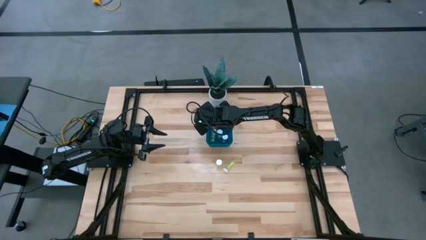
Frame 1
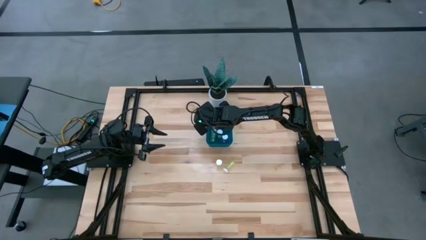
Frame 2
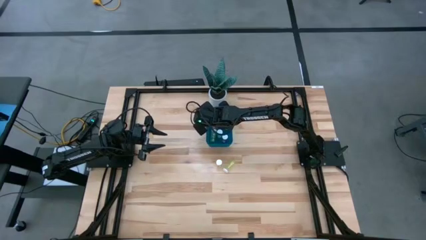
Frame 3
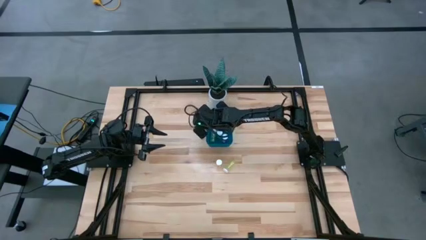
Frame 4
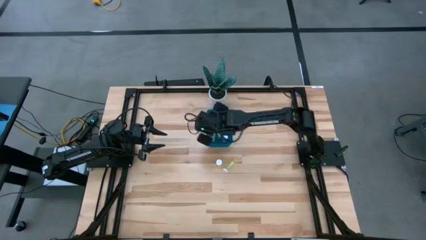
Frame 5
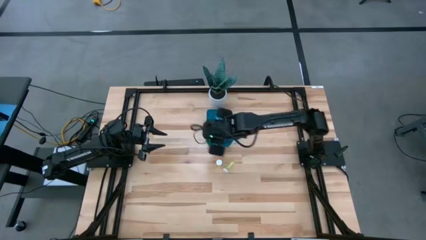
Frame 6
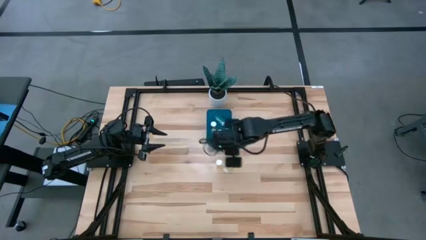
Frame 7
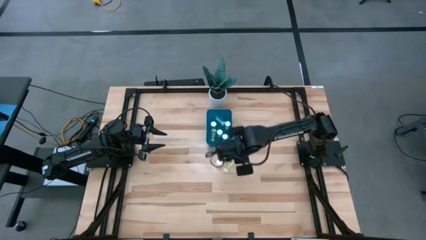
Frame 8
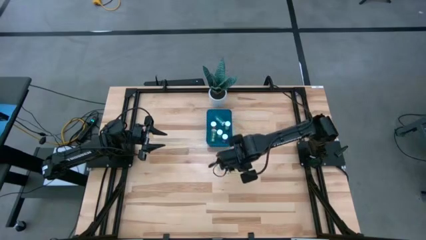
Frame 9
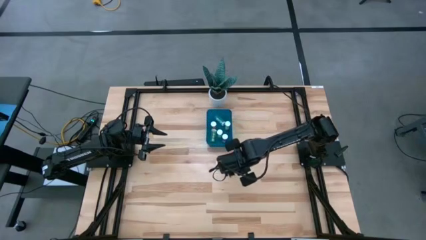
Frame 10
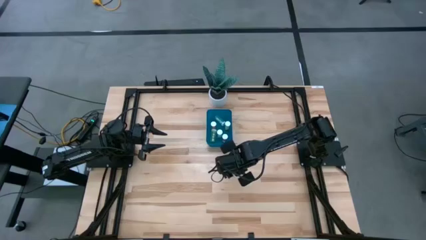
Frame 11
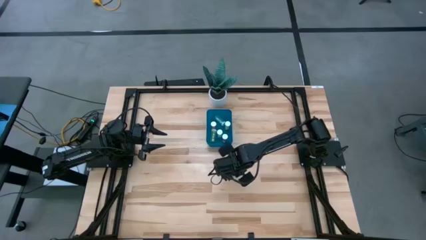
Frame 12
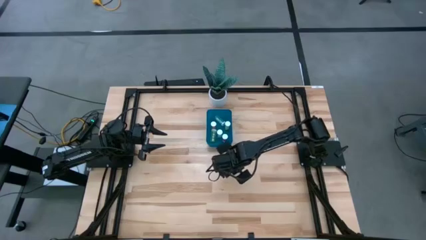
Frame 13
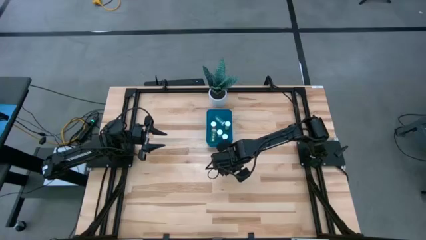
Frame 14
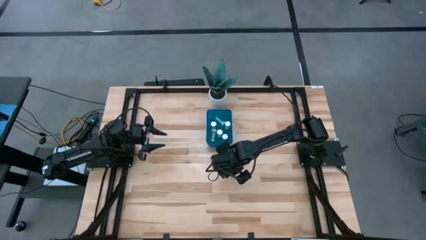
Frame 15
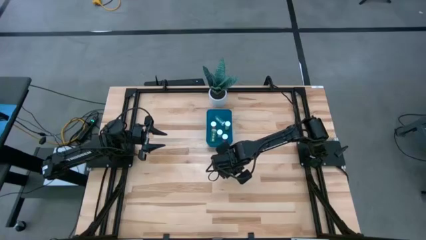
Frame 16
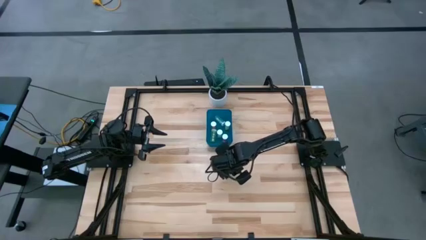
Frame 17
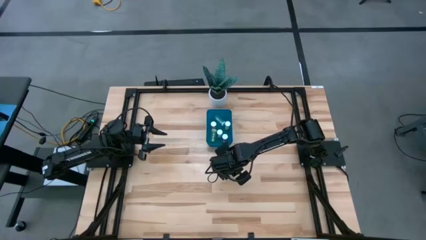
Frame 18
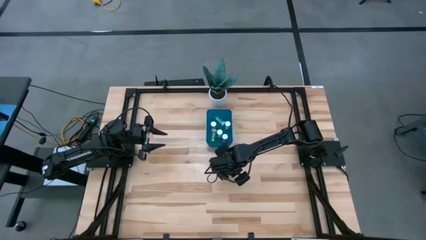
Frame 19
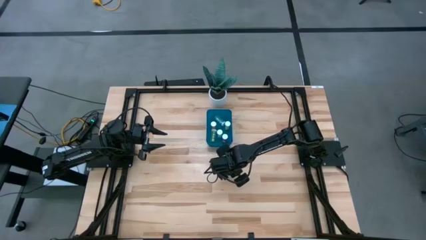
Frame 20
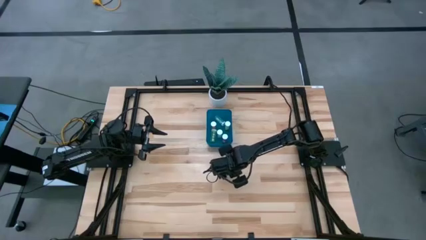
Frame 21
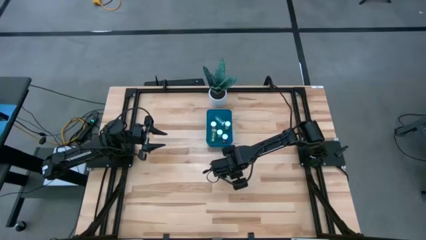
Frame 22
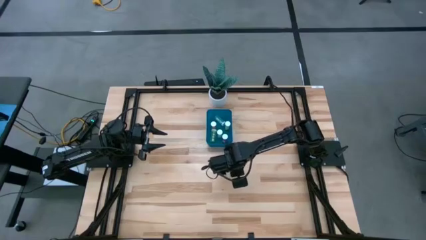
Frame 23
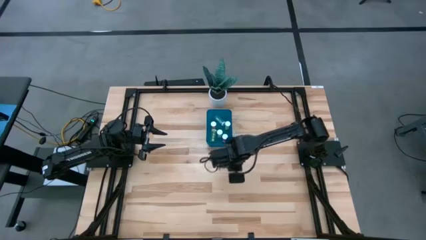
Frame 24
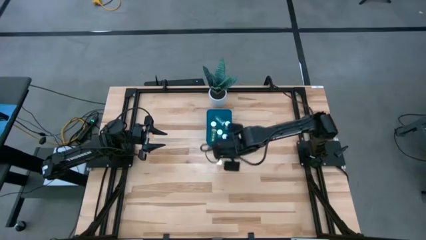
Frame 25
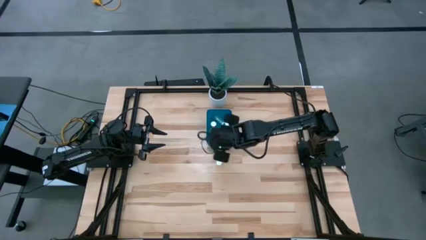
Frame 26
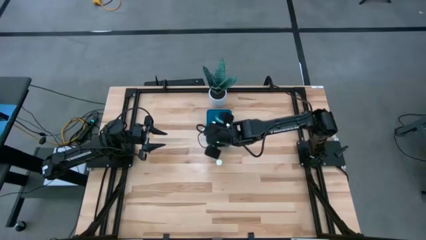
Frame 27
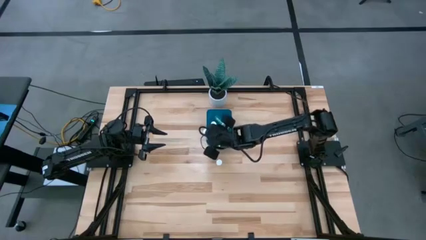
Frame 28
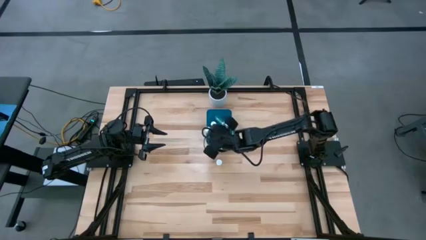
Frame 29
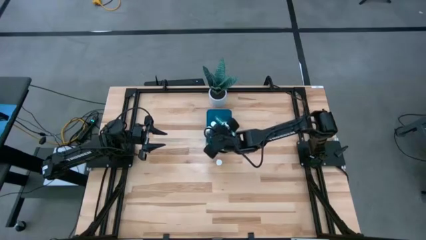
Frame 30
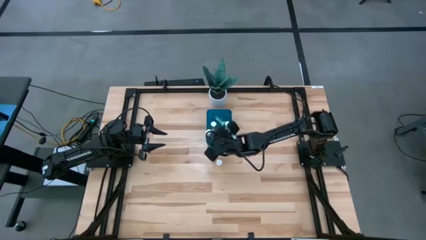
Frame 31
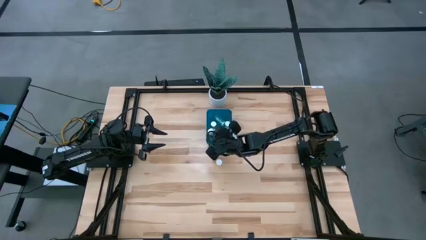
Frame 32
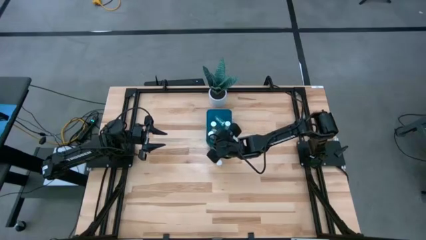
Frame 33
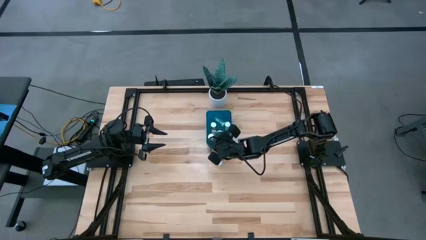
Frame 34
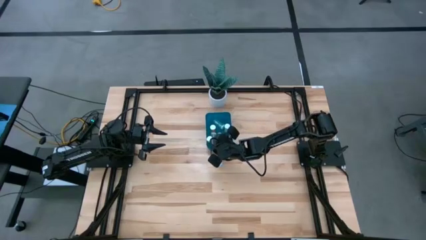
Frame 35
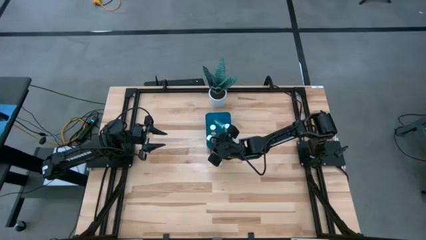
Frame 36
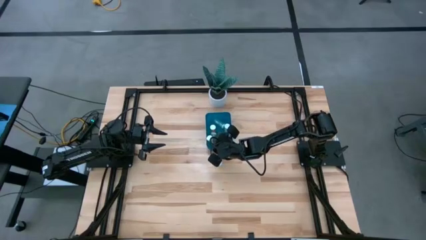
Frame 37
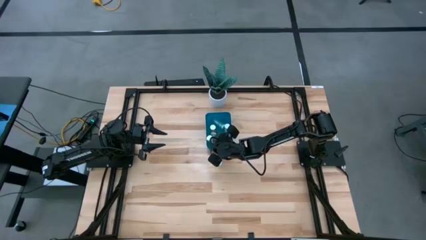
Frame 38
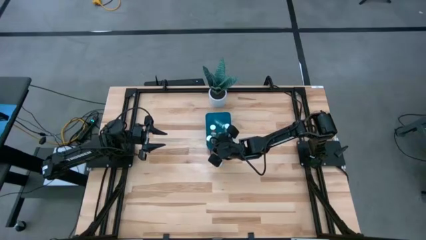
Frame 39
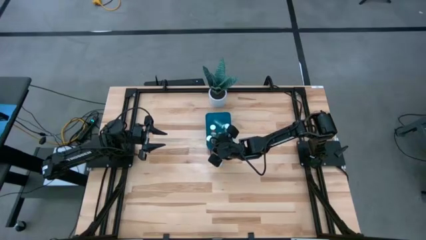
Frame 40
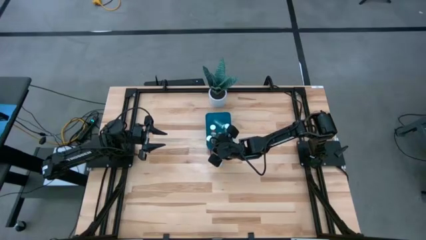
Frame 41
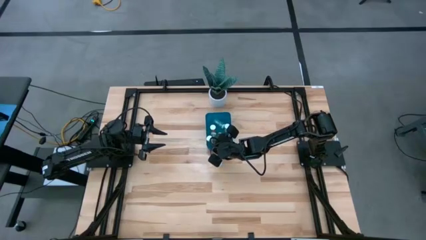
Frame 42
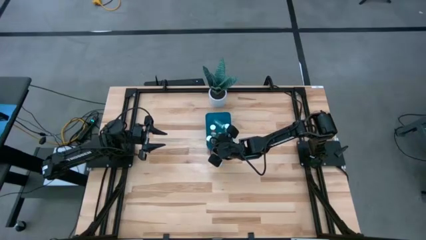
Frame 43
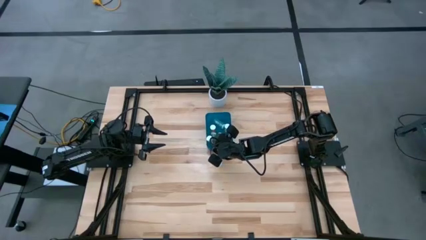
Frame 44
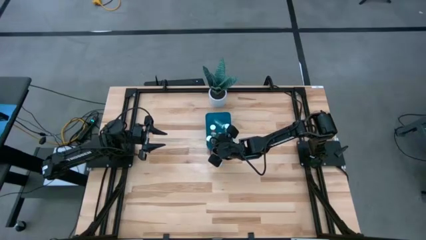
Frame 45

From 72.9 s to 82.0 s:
Task: Pick and place pill bottles into a basket
Put the right yellow pill bottle into the bin

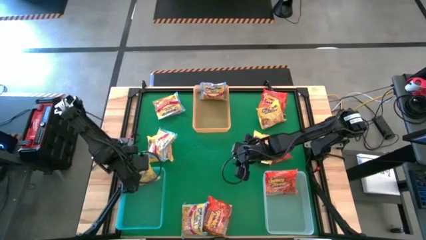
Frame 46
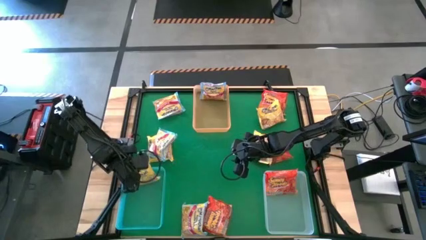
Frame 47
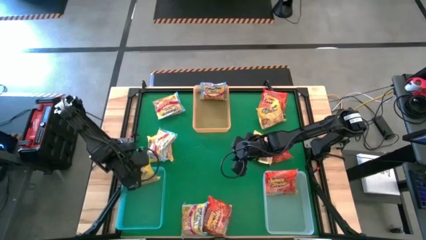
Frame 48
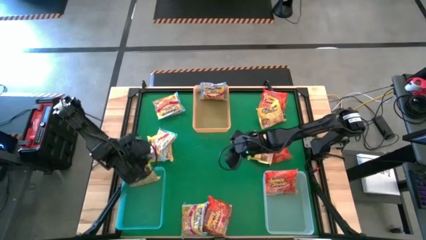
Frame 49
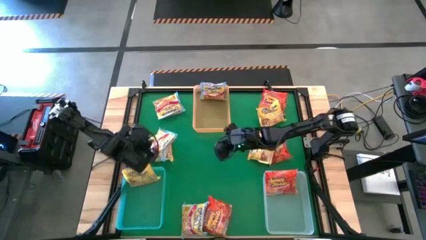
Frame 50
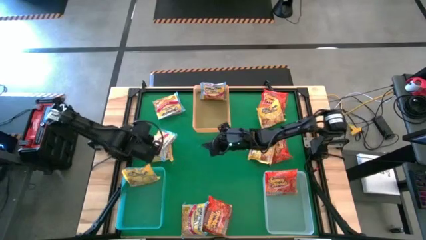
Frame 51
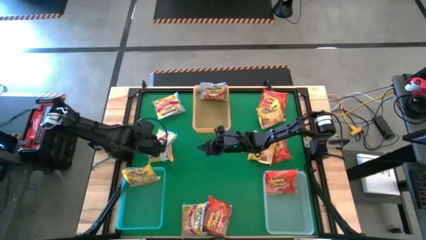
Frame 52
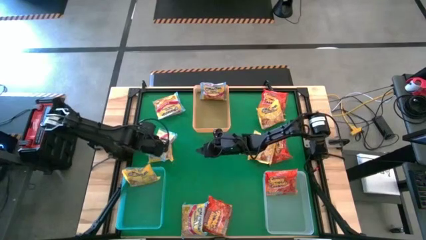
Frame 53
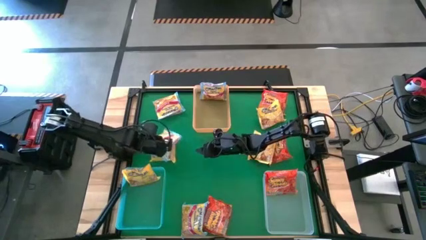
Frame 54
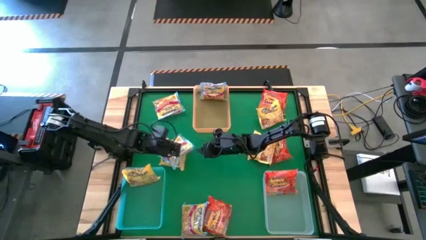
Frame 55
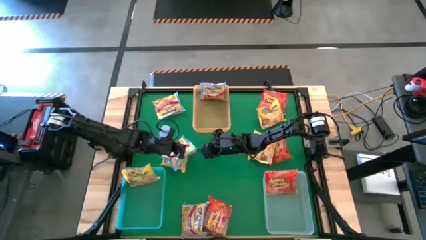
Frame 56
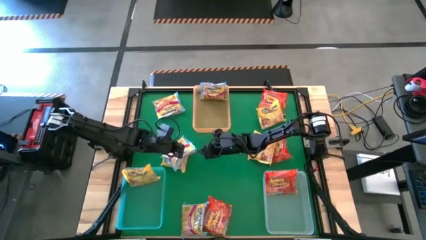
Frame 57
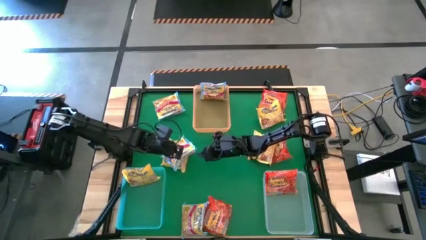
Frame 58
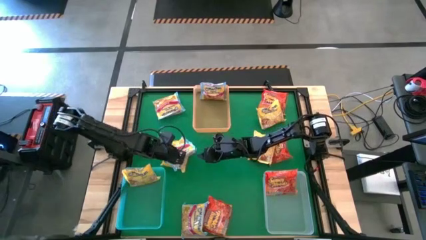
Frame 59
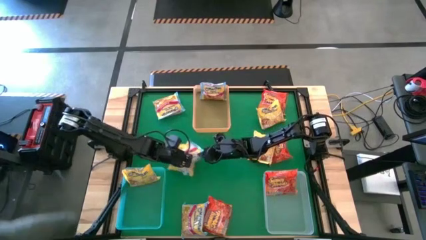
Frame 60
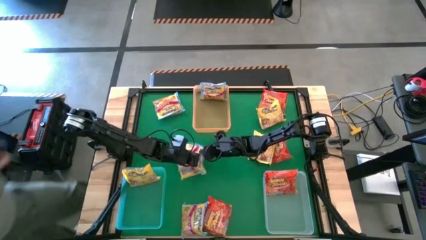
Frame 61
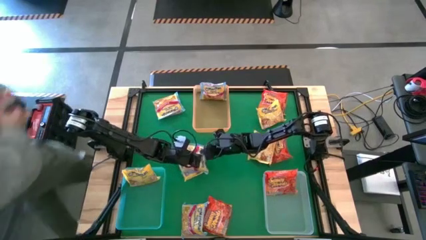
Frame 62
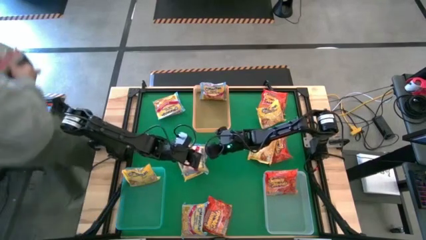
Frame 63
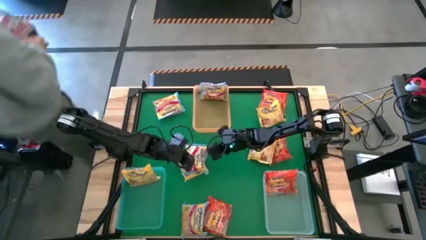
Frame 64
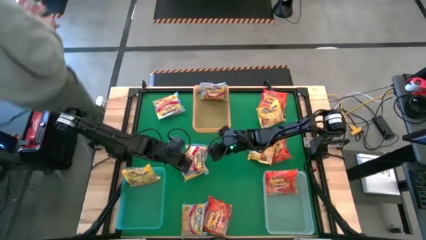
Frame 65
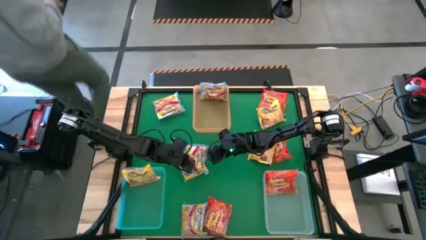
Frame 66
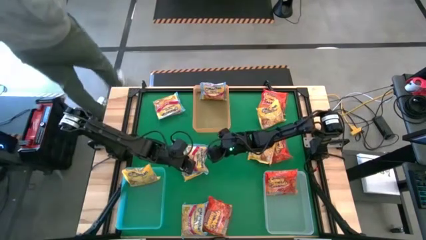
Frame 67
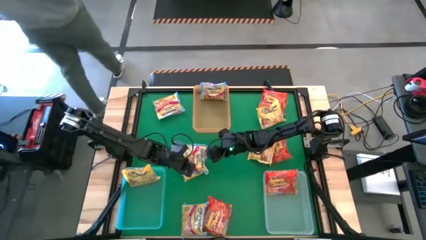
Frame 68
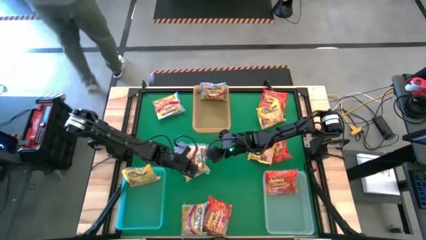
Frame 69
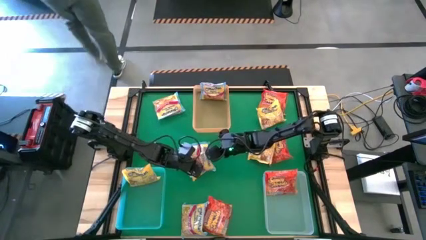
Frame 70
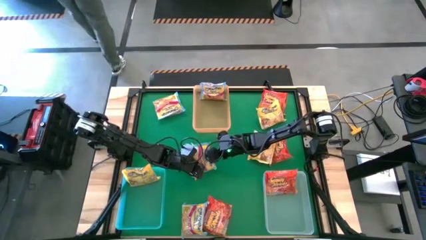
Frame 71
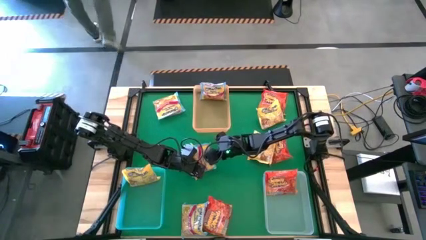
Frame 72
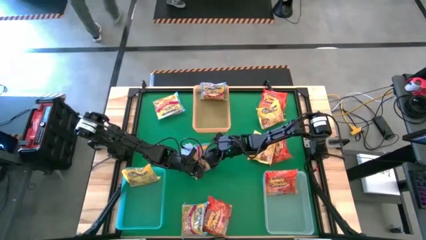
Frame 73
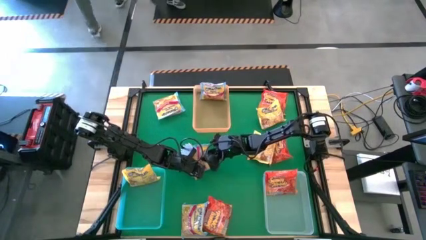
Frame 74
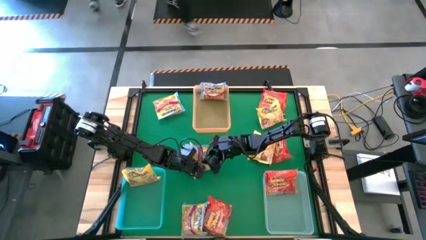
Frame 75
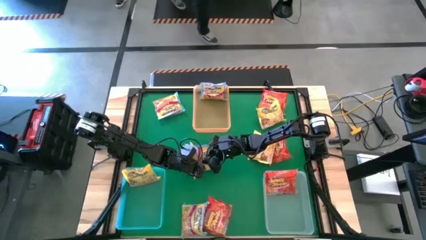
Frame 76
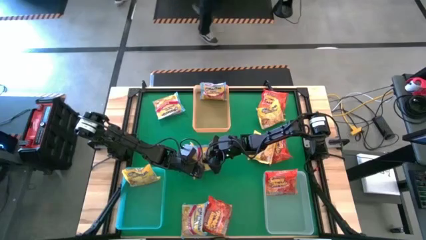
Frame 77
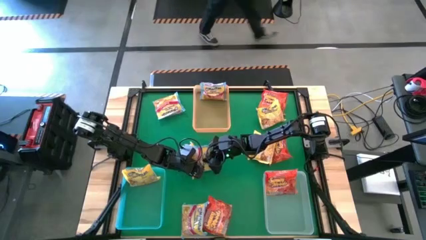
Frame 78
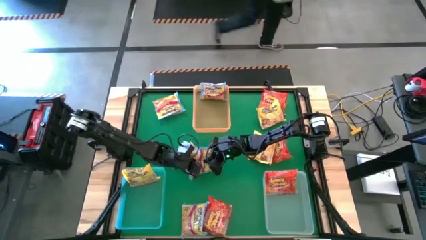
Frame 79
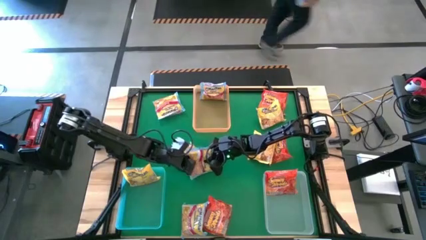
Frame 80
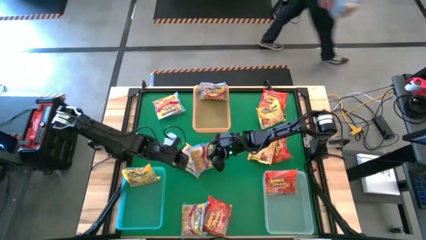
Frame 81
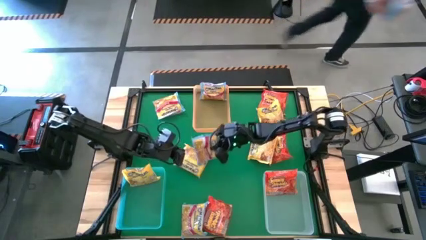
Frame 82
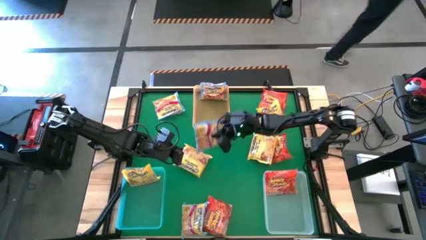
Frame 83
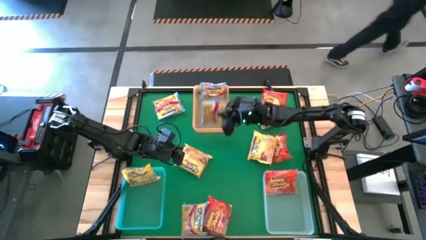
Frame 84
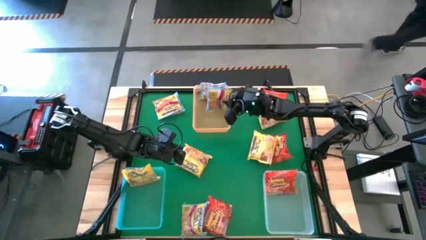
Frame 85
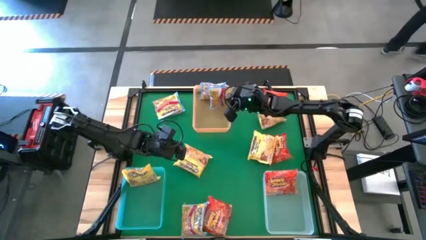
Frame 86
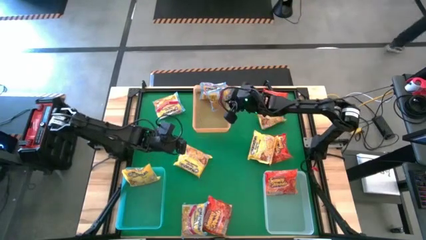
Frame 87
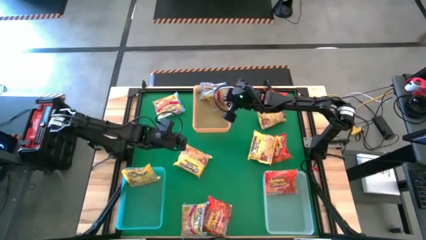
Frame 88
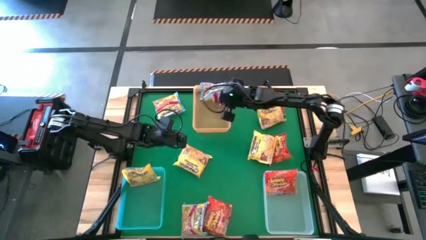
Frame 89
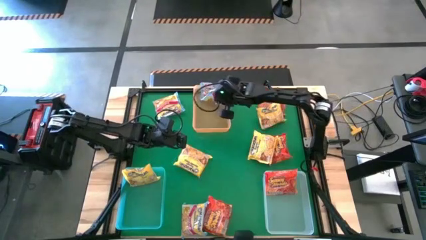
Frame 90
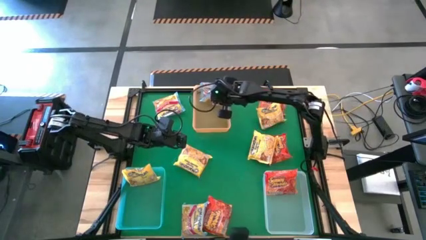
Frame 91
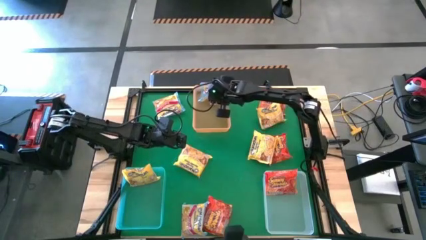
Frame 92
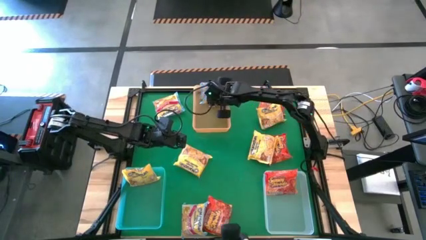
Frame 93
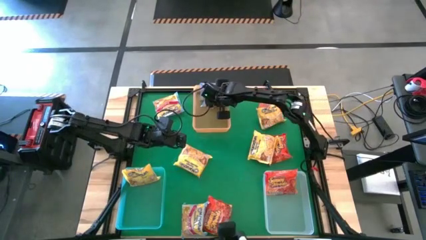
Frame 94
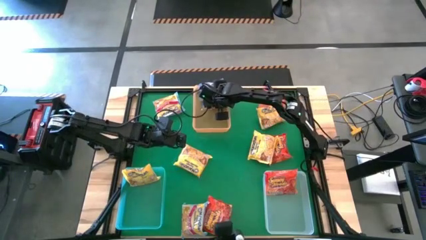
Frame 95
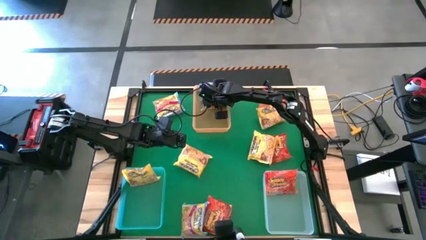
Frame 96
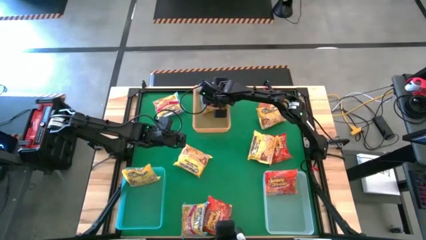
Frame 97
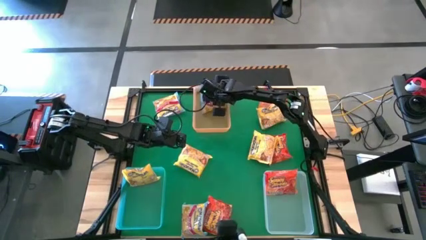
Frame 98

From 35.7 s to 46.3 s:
Task: Sort Maruchan noodles
Put the blue noodle pack into the yellow bin
